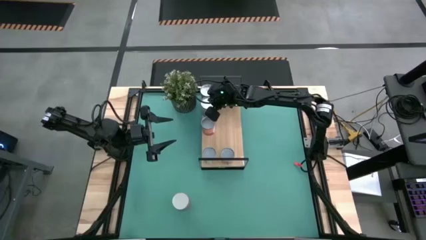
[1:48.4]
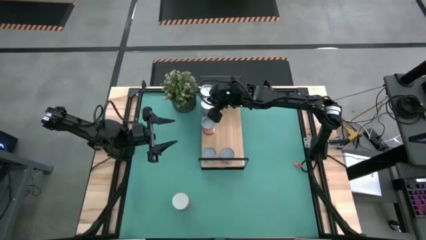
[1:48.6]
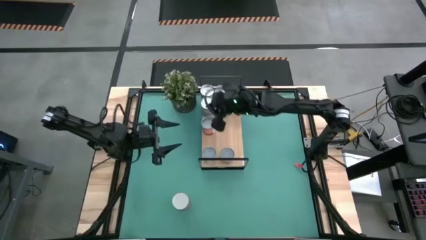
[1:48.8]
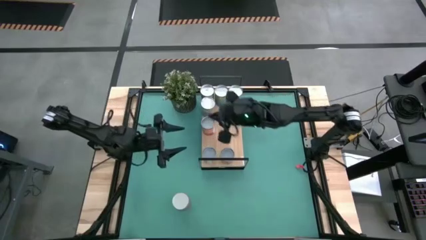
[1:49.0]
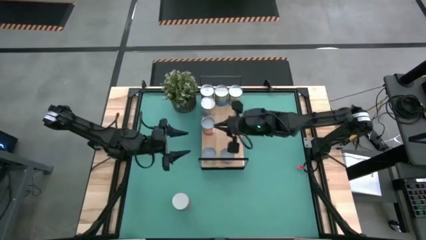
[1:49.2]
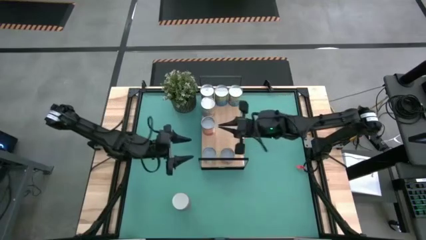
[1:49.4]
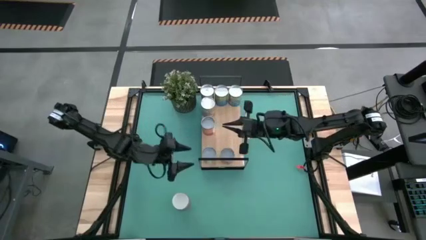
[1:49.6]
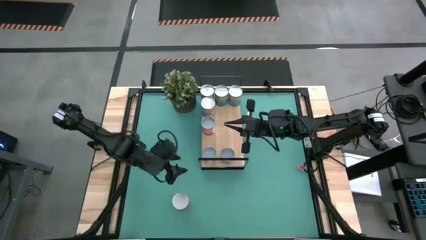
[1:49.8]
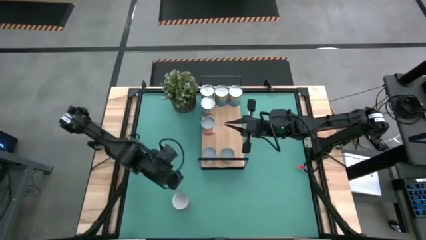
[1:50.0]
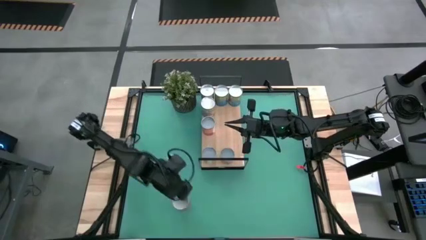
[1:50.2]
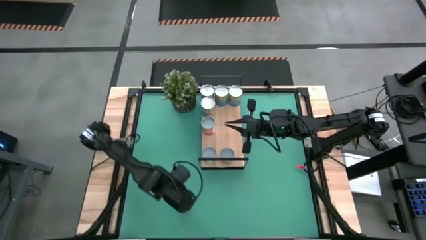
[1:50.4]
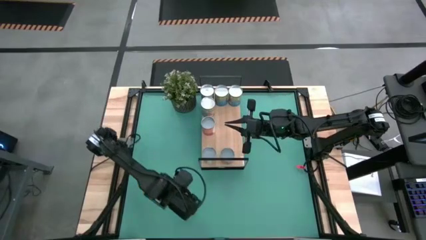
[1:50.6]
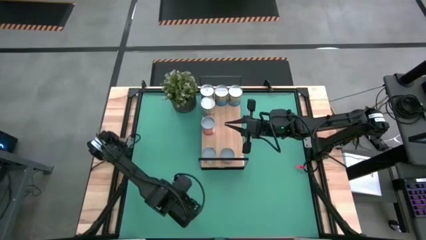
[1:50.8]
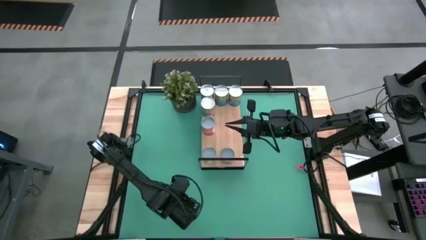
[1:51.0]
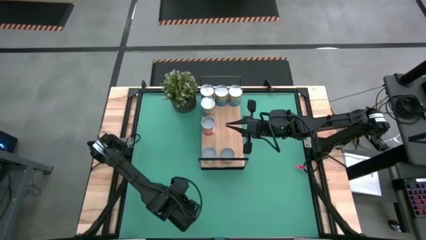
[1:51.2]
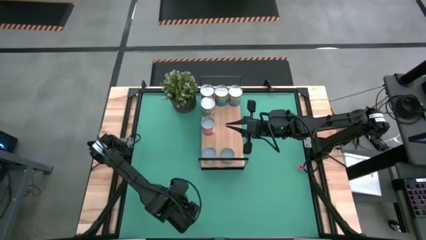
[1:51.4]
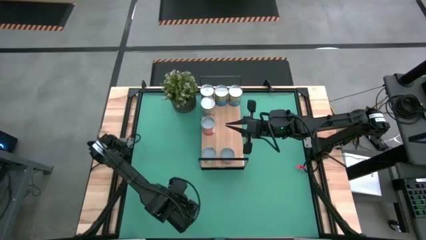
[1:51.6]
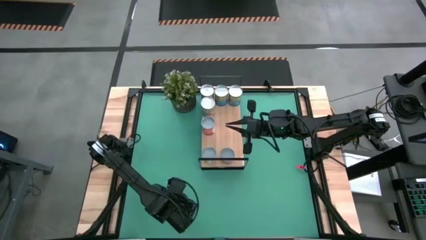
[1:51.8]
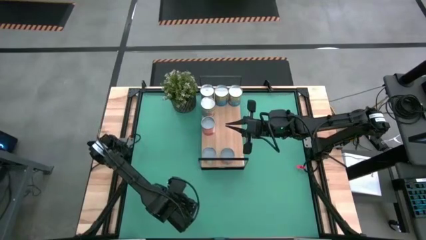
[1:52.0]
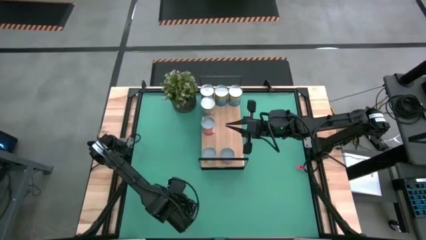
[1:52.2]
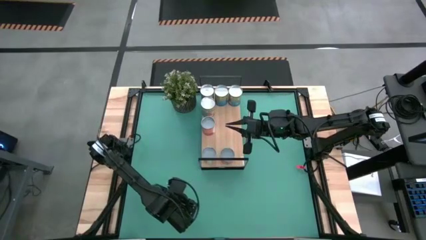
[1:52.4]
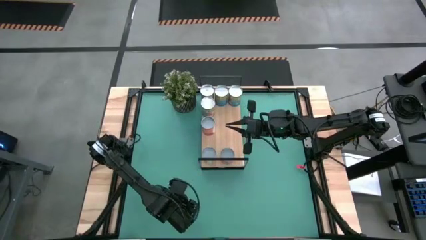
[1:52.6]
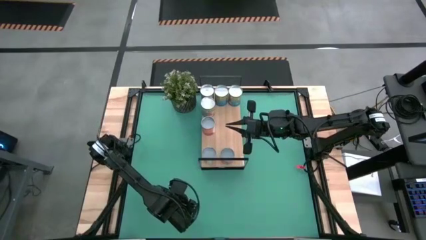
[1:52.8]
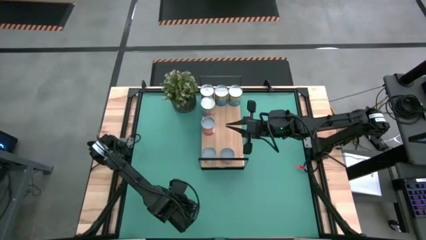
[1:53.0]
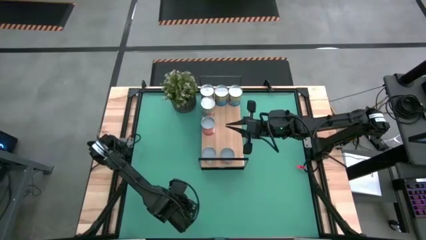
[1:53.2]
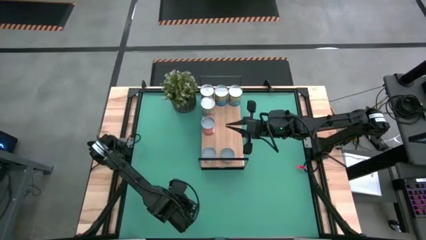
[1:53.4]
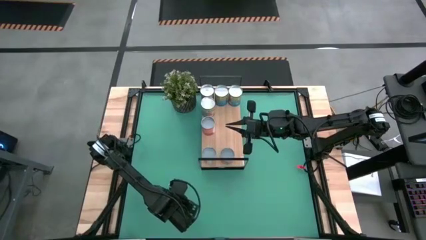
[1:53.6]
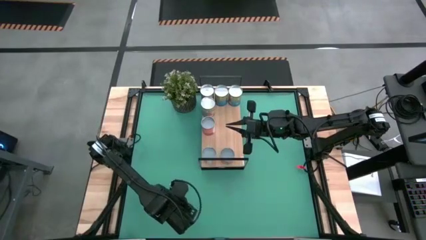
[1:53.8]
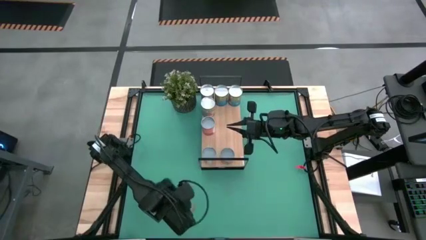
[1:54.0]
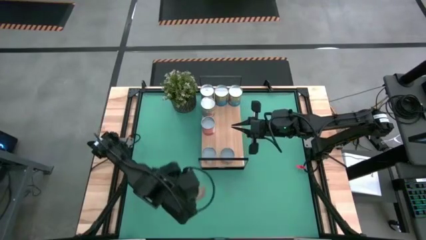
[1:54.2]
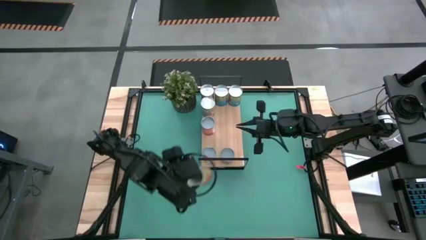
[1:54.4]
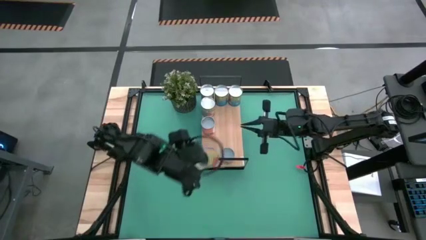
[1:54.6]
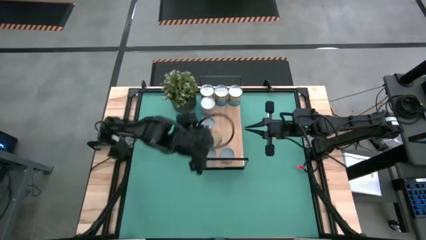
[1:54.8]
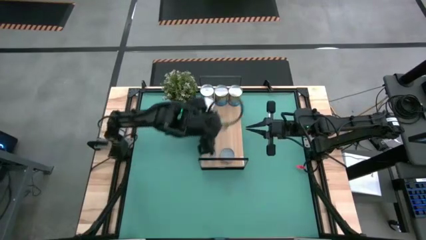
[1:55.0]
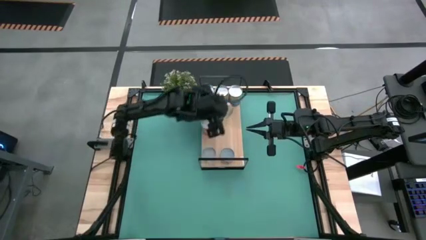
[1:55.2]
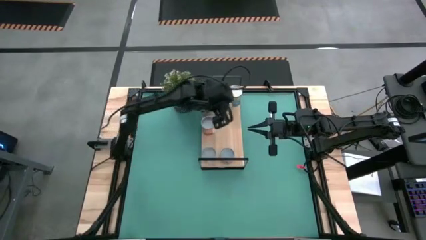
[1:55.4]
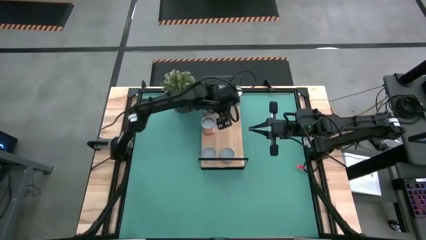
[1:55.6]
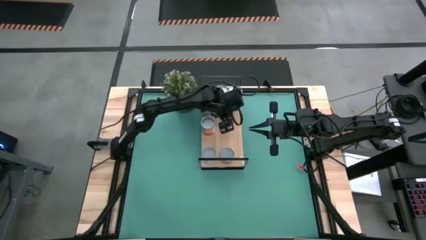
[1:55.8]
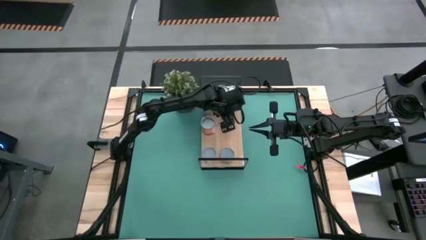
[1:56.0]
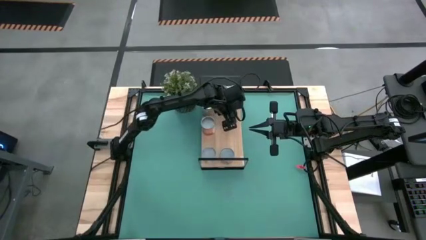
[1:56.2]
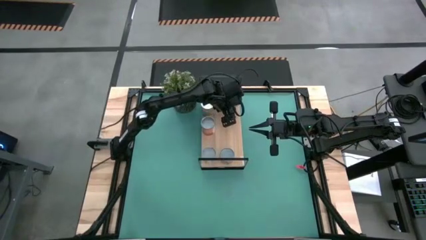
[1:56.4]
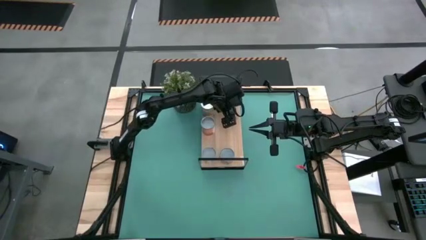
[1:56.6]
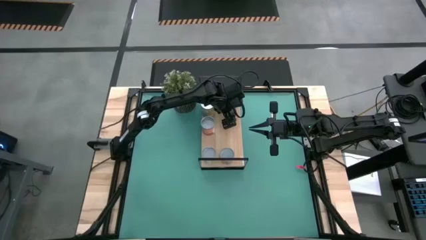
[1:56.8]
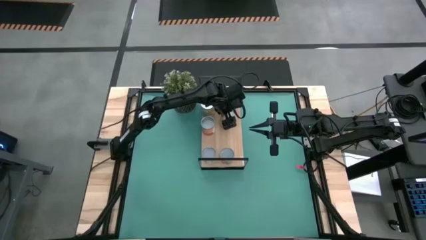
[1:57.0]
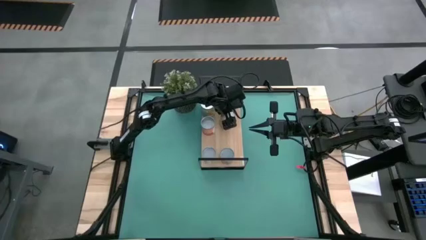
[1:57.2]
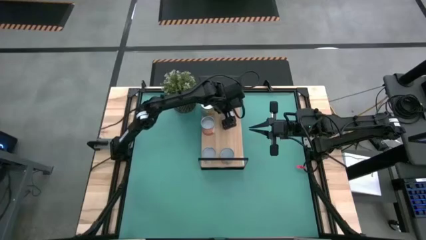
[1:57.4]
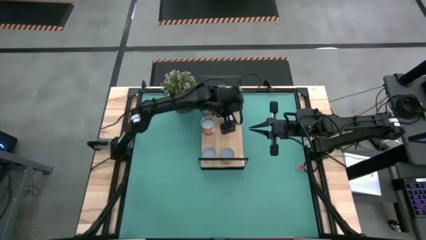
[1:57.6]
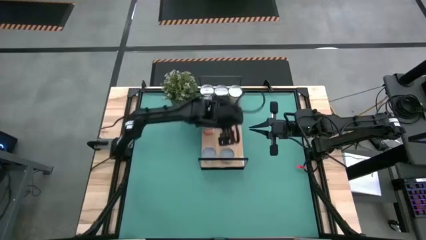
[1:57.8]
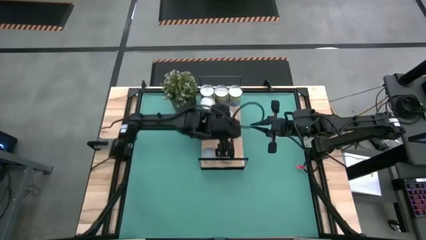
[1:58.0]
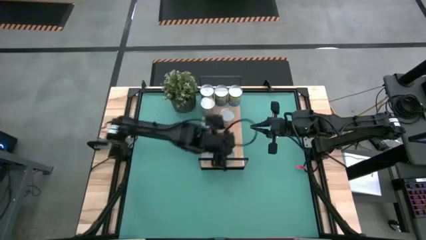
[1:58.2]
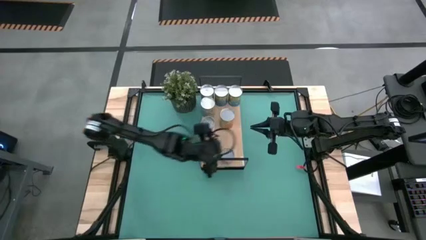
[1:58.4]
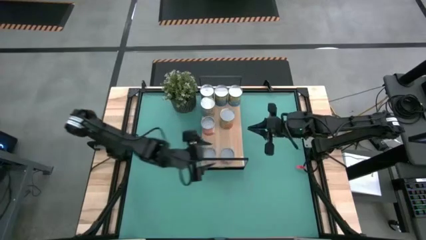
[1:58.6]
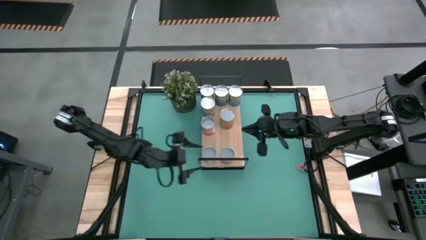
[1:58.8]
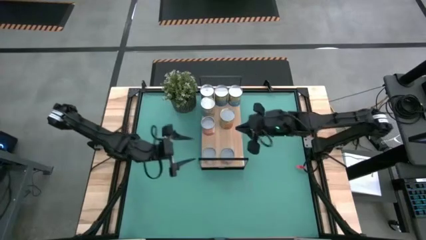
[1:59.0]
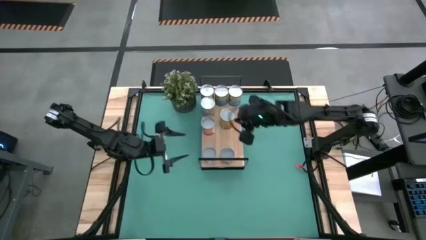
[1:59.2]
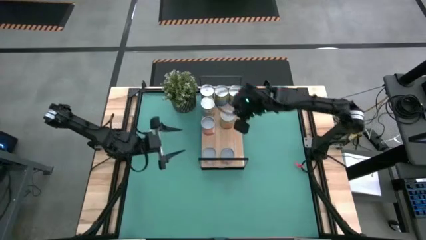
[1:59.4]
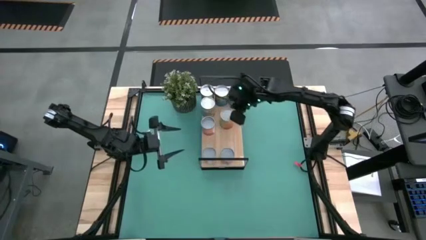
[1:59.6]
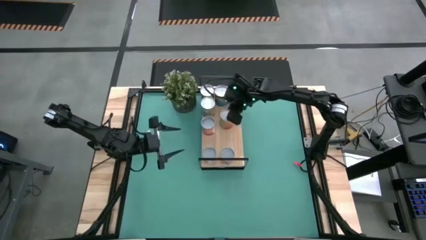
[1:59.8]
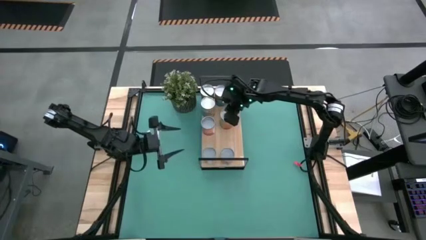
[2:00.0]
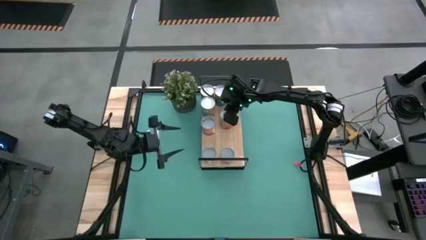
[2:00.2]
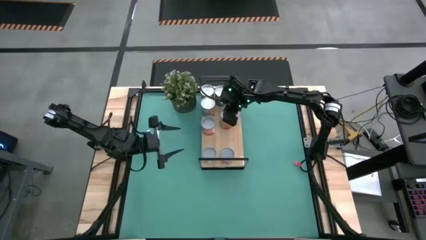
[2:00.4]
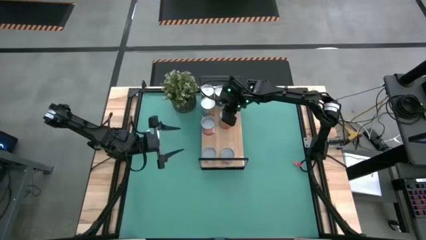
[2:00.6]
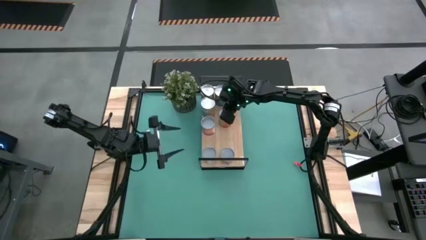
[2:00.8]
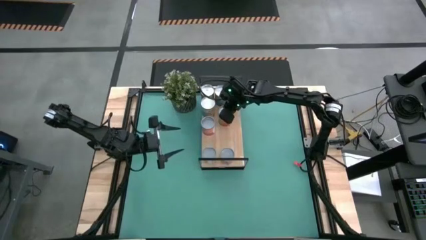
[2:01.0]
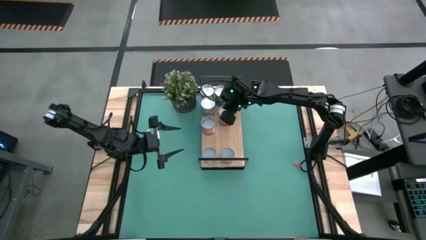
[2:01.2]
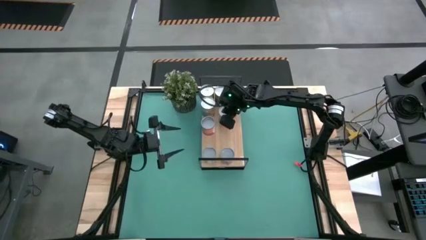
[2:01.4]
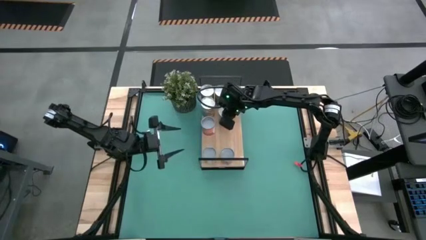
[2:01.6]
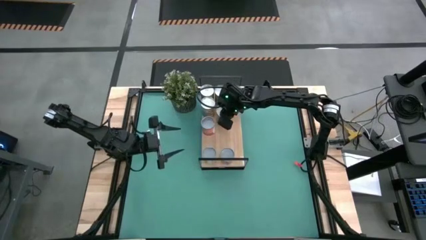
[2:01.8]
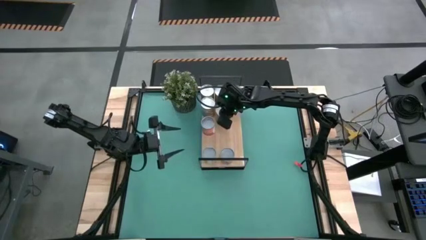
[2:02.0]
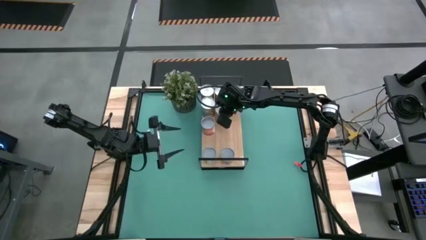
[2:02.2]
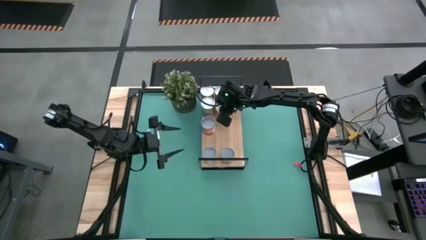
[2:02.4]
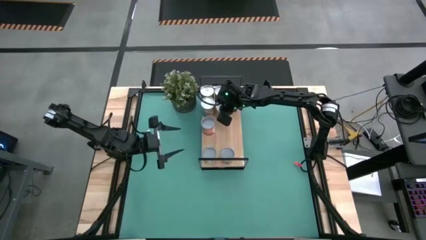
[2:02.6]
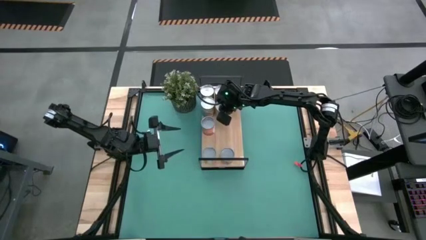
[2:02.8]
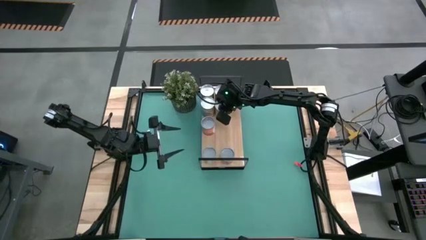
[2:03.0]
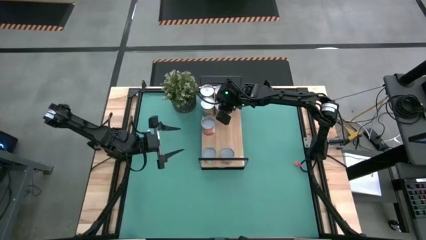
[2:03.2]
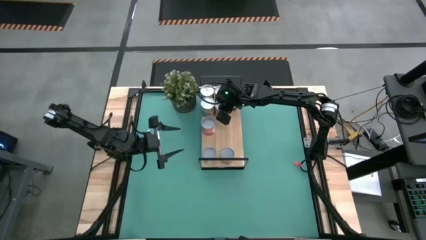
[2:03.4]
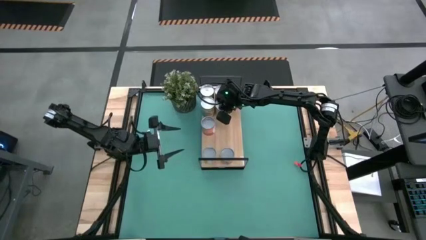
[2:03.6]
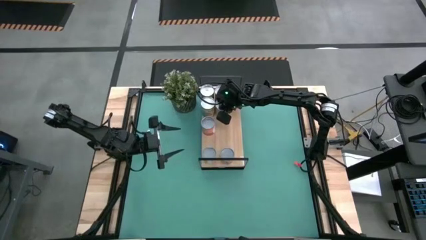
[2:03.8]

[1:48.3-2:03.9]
Task: Pick and place cans onto a shelf
Put the canned pineapples on the shelf

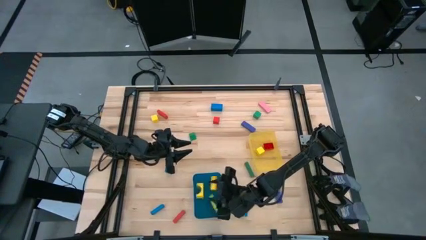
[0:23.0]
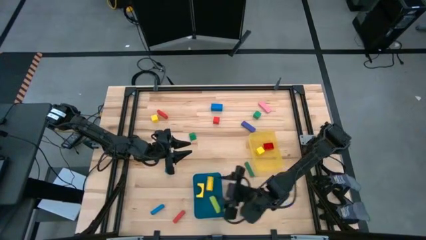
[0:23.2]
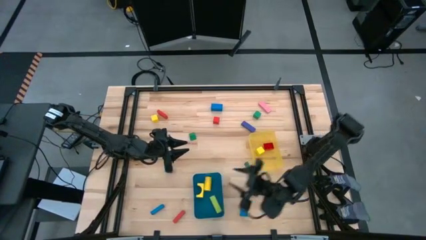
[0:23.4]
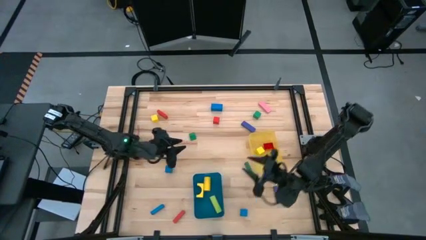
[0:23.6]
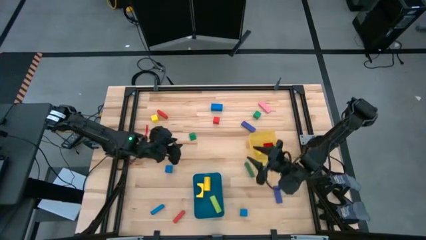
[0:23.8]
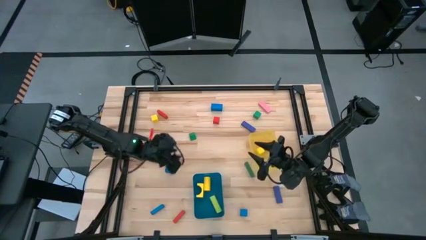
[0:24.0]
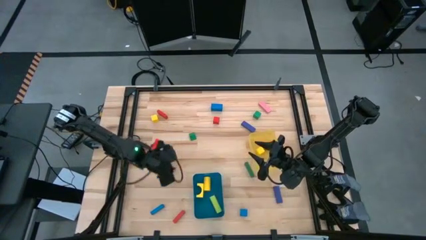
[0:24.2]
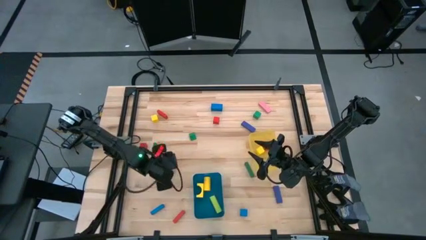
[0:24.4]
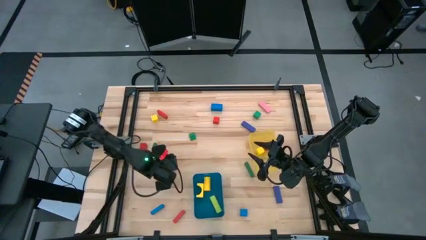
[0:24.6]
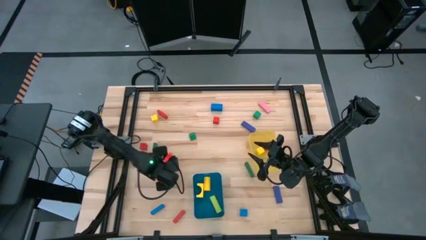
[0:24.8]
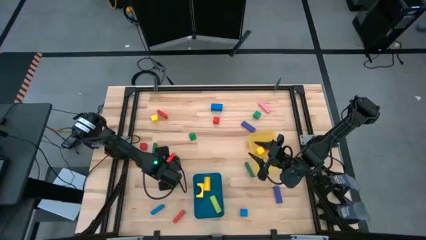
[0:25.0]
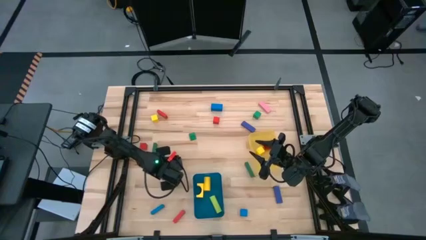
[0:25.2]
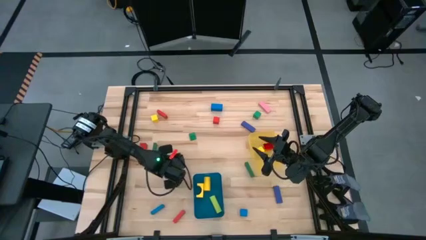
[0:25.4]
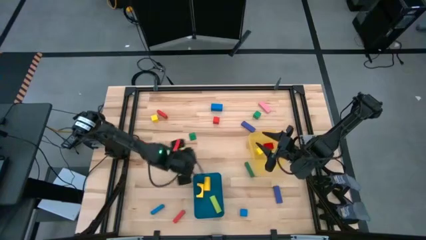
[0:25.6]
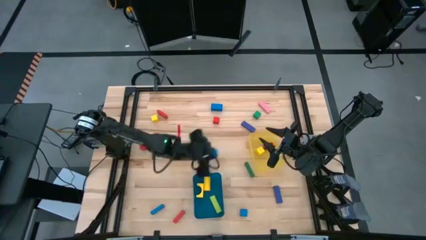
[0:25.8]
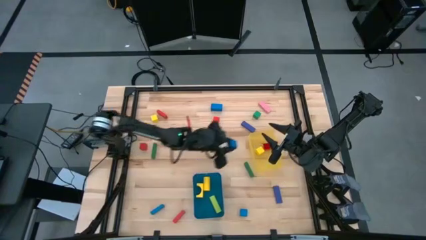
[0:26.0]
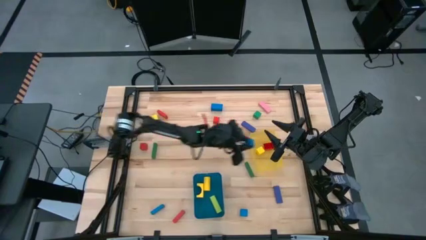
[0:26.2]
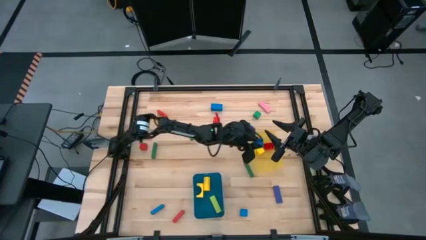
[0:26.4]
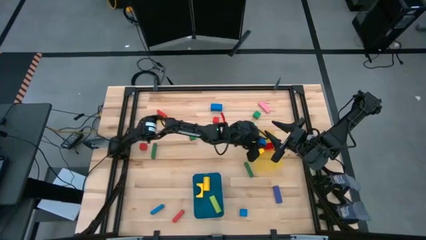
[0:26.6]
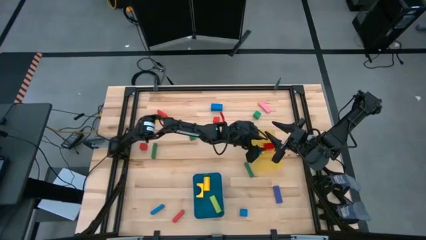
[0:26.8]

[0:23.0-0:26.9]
Task: Sort blocks by size
Put the small blue block into the yellow bin
